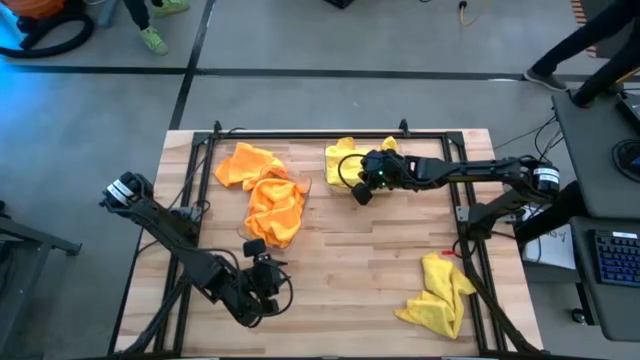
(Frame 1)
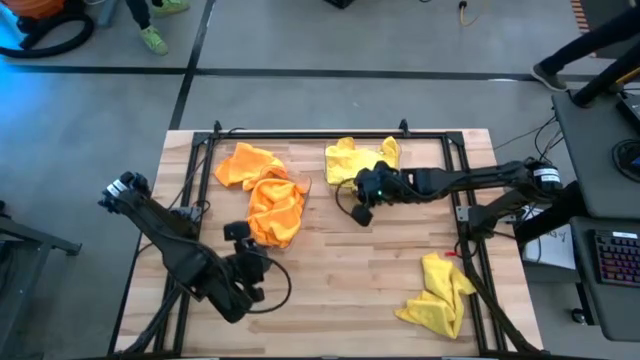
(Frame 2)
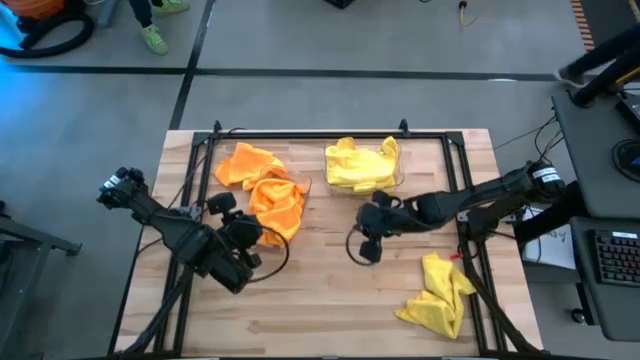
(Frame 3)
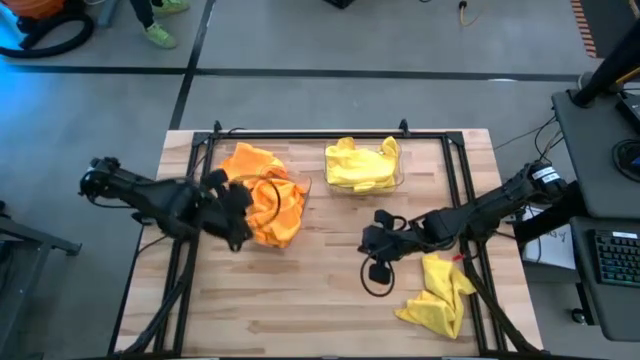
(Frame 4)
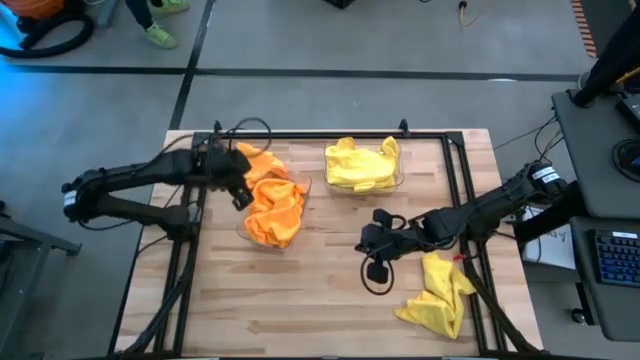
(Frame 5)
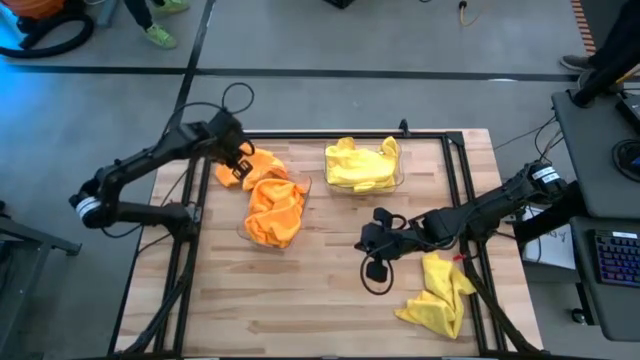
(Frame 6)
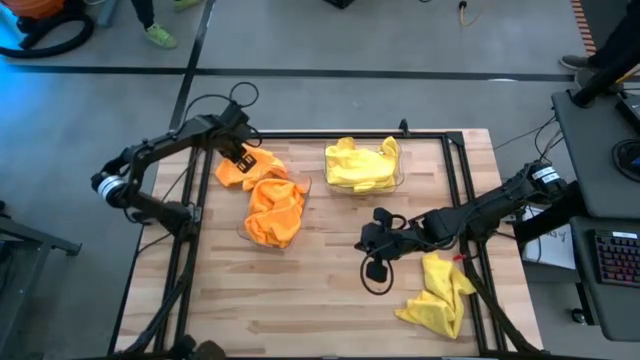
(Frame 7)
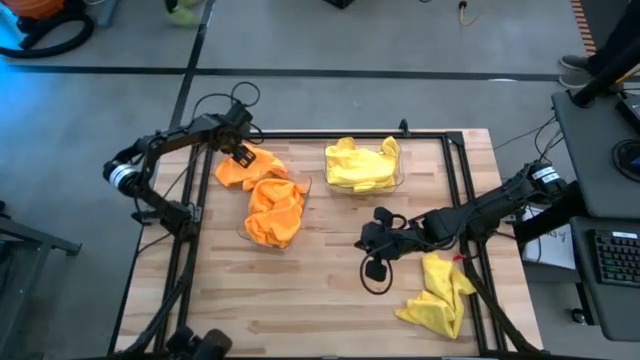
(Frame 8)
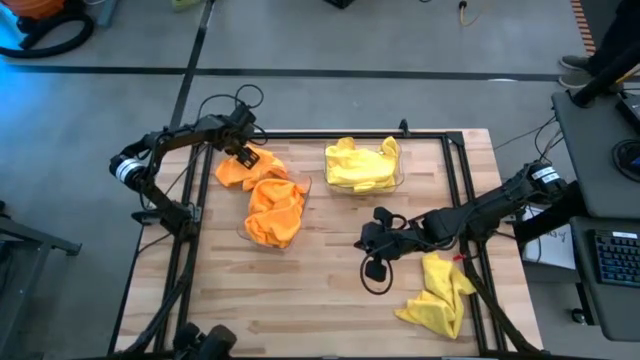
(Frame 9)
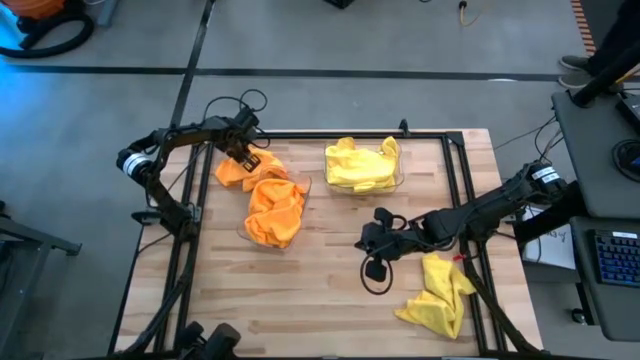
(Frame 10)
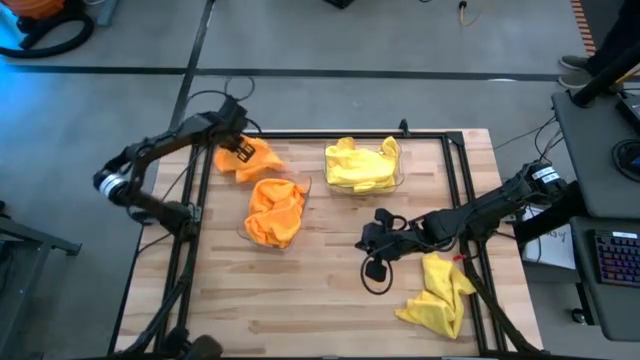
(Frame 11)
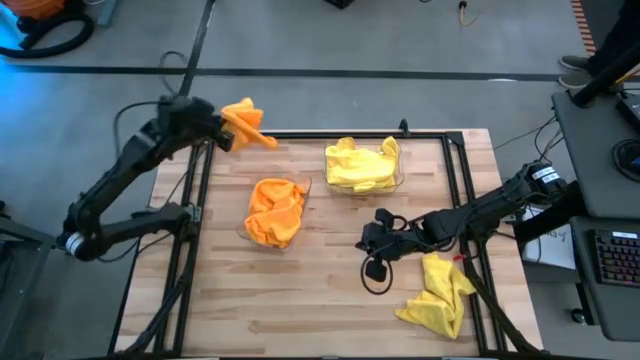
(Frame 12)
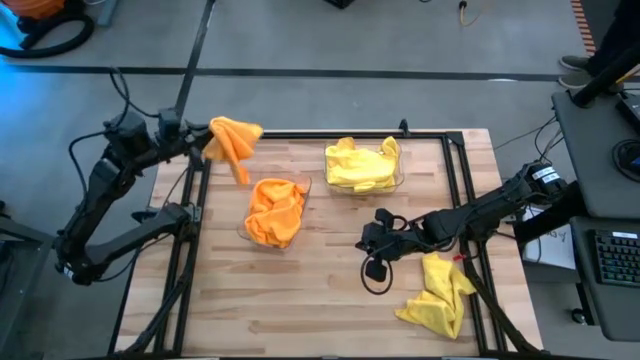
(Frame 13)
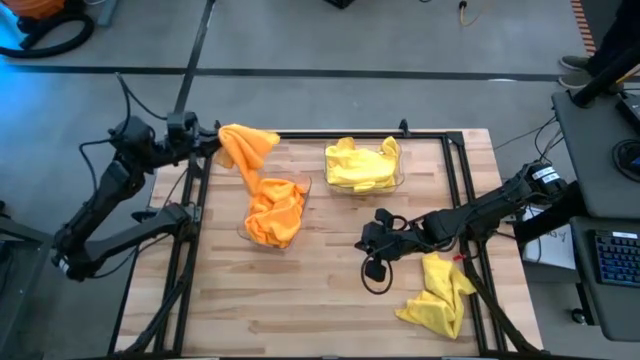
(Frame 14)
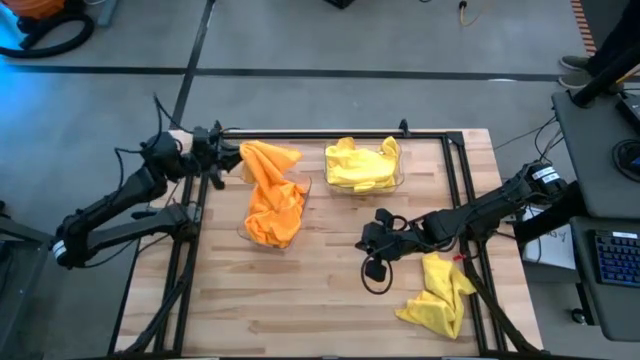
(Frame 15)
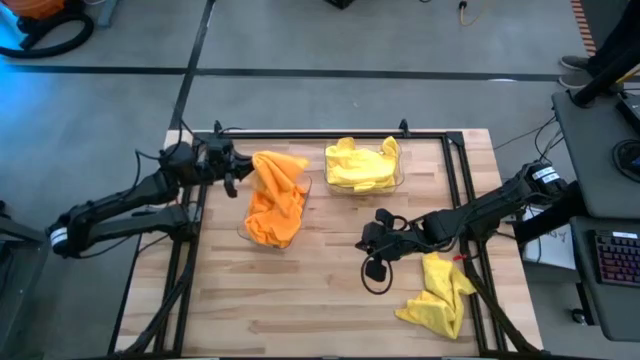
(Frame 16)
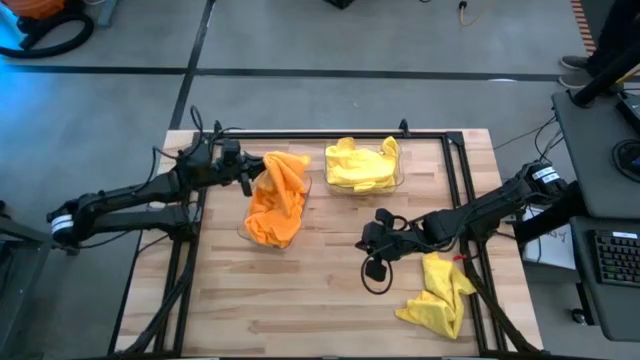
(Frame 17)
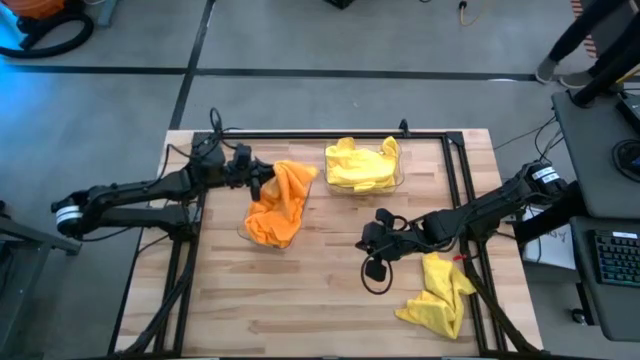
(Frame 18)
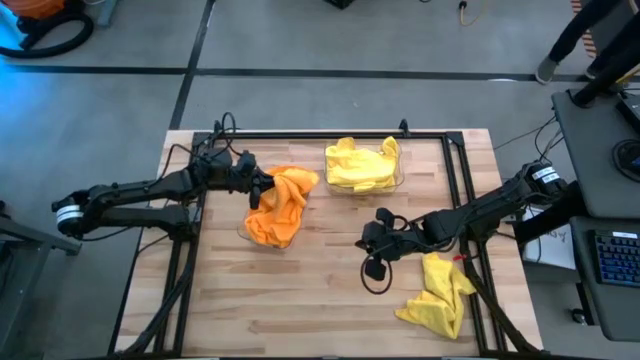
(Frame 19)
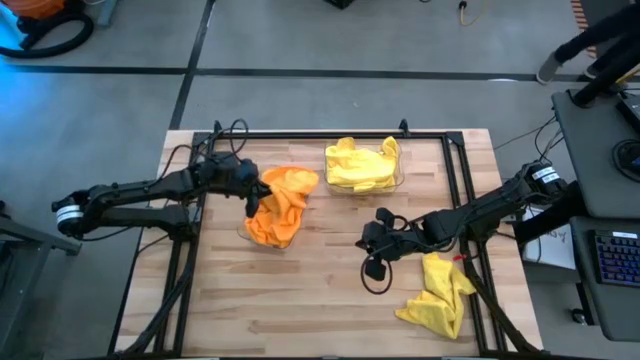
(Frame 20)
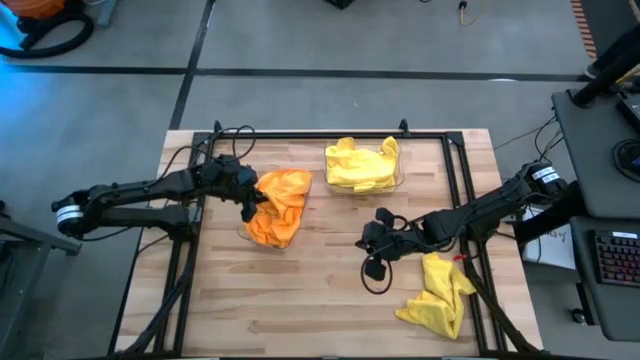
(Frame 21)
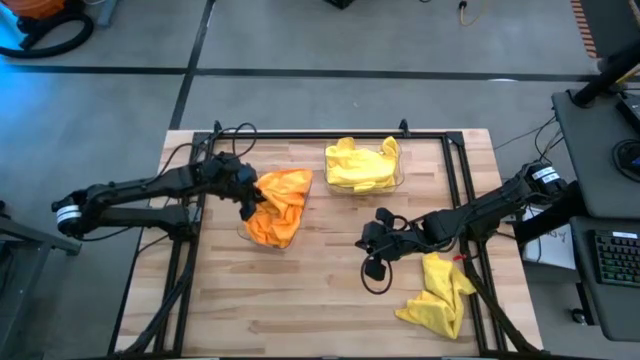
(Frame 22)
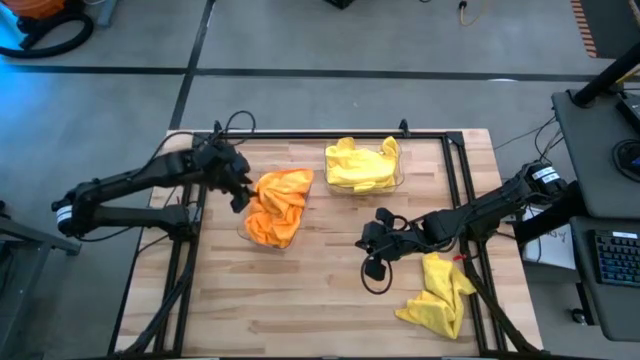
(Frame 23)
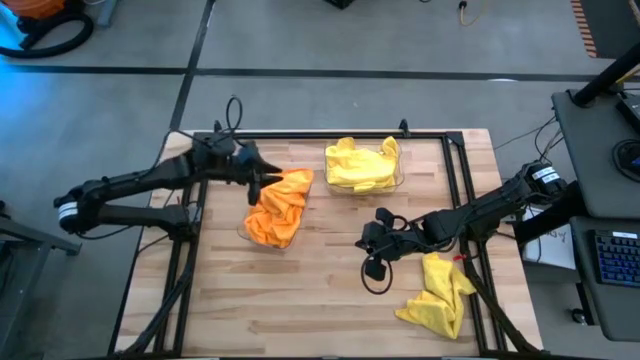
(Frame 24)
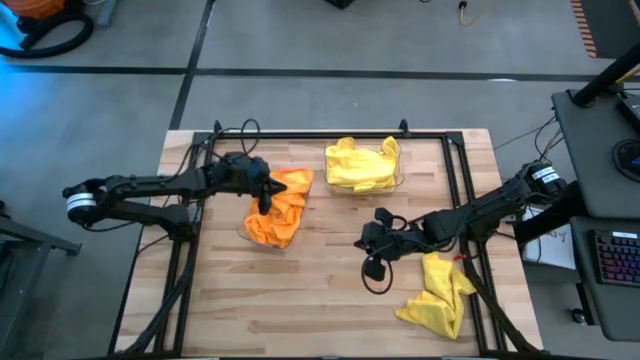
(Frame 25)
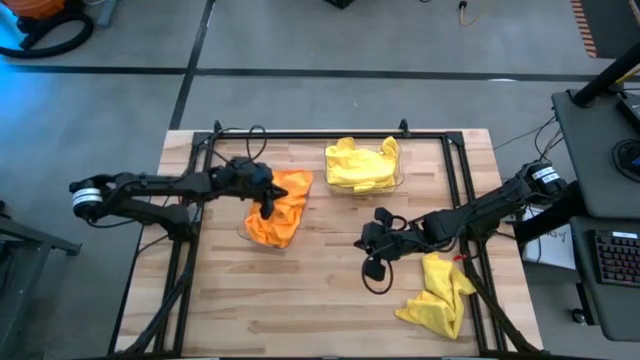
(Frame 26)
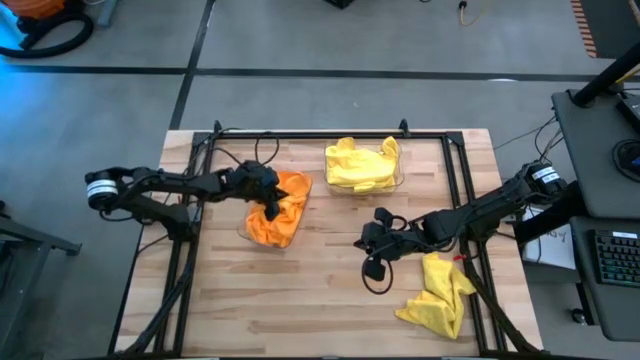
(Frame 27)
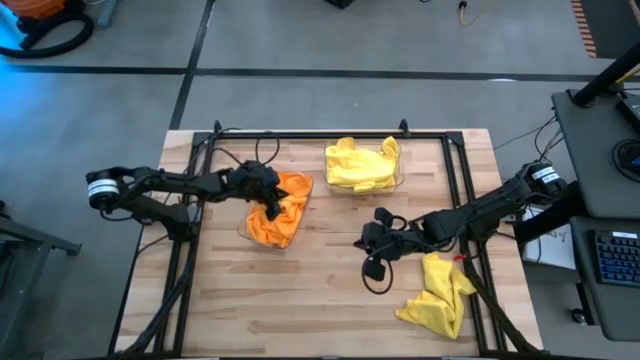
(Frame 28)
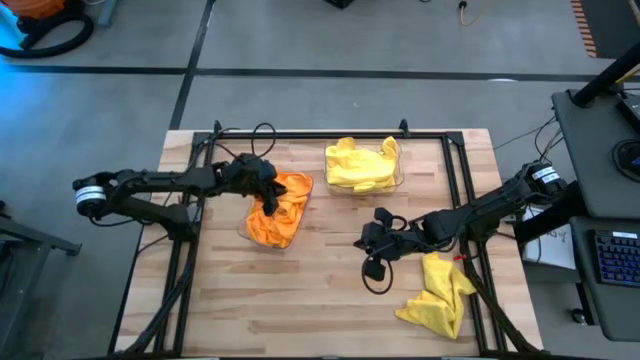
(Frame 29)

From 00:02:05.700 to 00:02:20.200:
Task: Sort microfiber towel by color & place in baskets
Put the orange microfiber towel into the left transparent bin

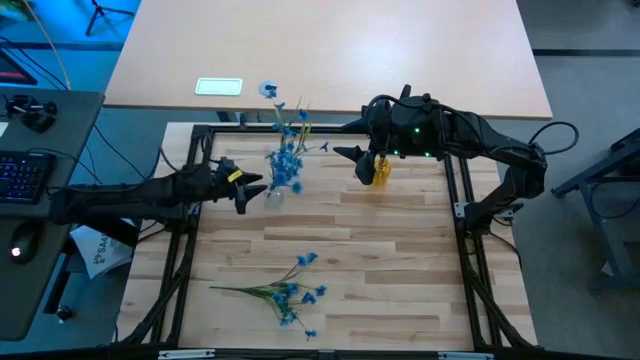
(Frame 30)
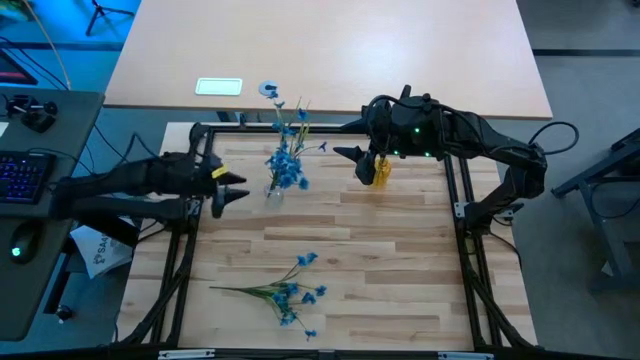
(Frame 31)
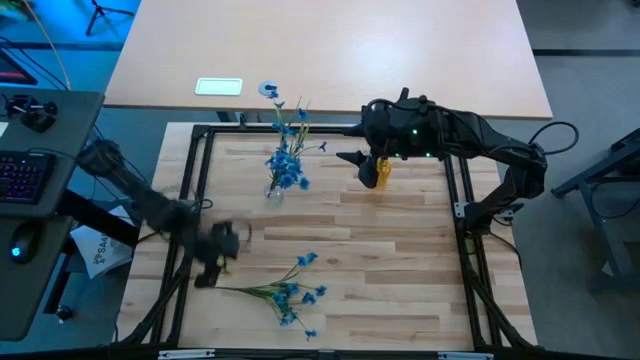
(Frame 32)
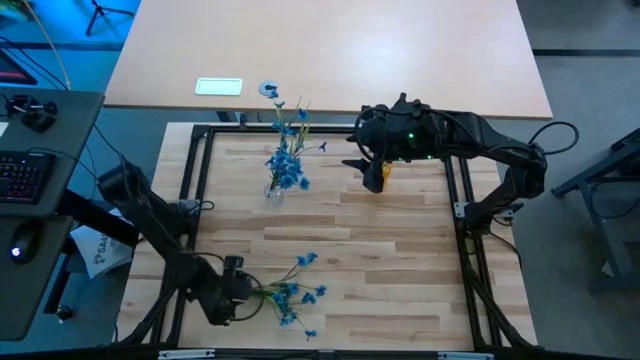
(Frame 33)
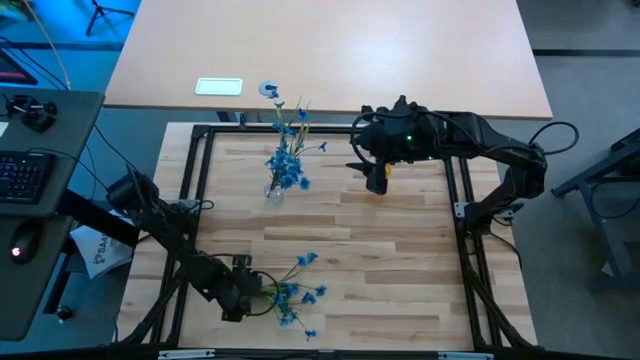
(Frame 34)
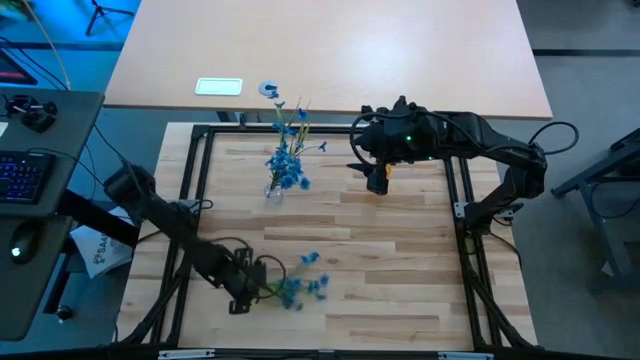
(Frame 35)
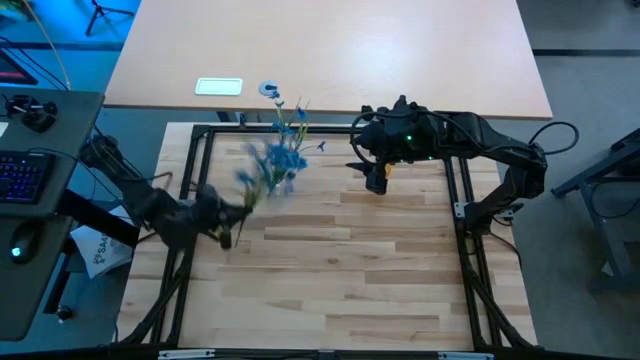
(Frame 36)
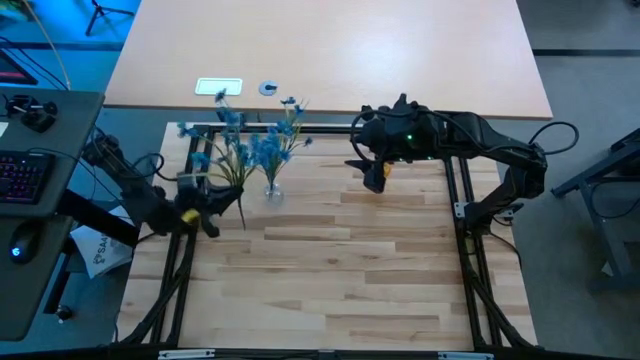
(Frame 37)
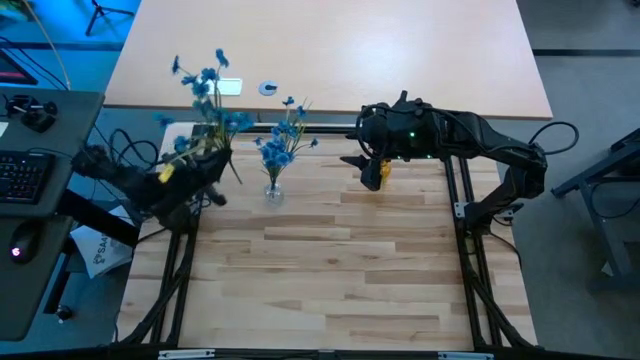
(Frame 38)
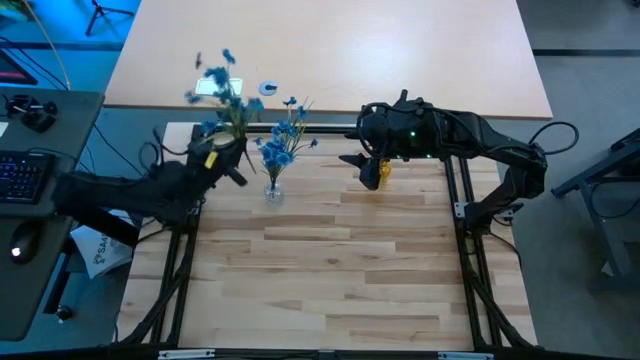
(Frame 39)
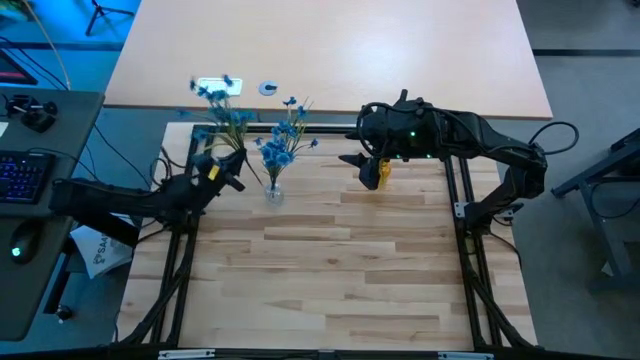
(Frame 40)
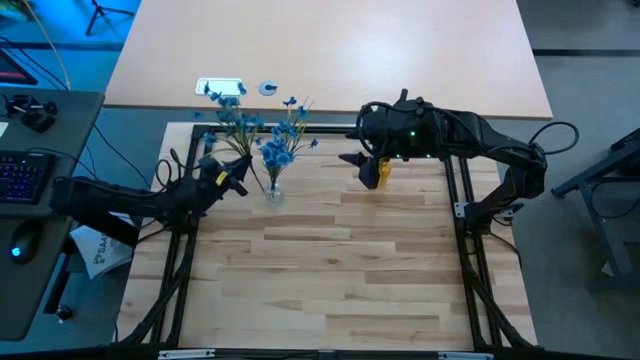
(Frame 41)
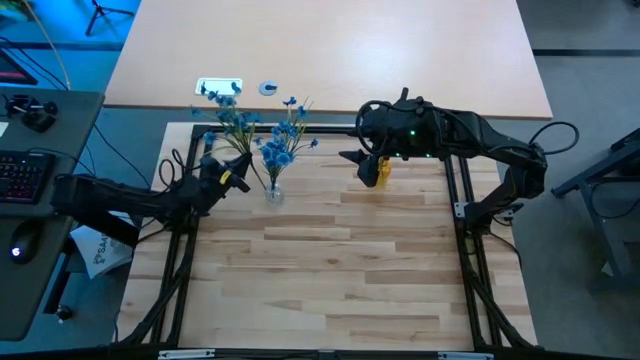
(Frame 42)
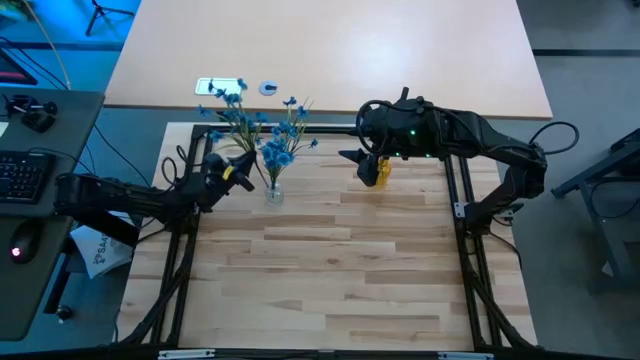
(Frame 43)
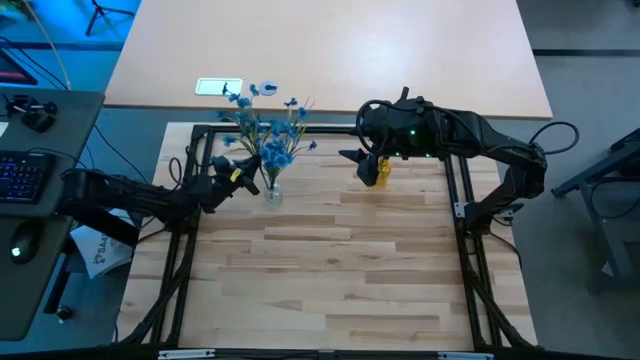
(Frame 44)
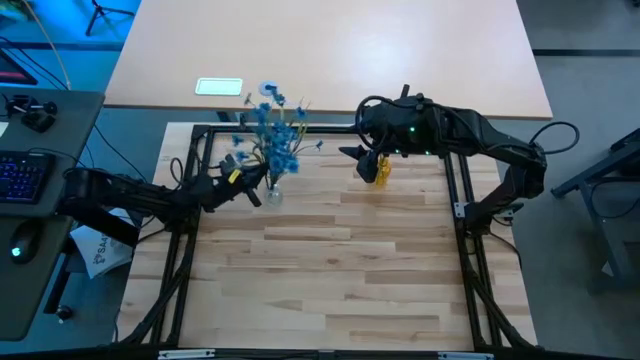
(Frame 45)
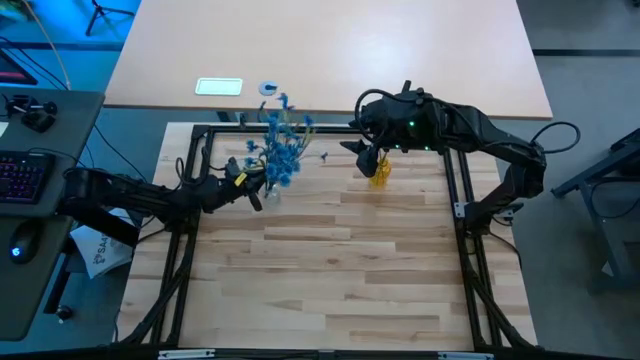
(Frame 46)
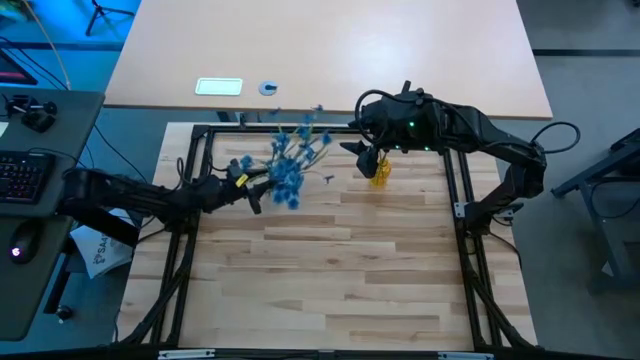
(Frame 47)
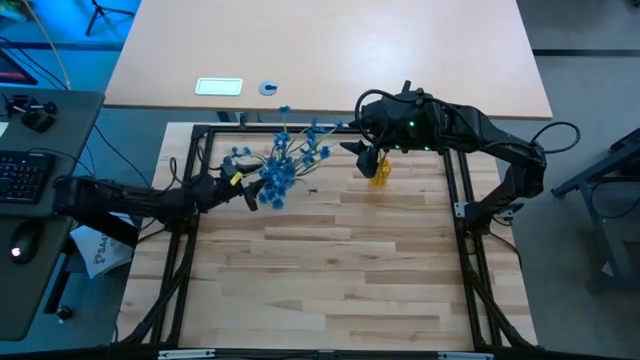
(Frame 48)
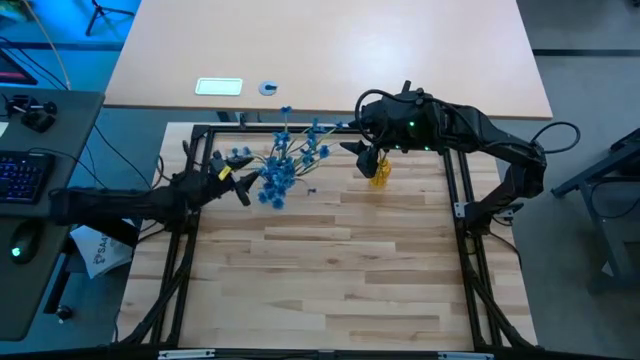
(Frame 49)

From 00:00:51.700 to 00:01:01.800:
Task: Sort flowers into vase by color
Put the blue flowers into the transparent crystal vase
